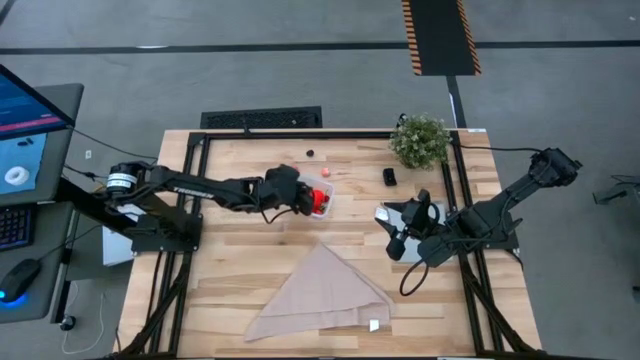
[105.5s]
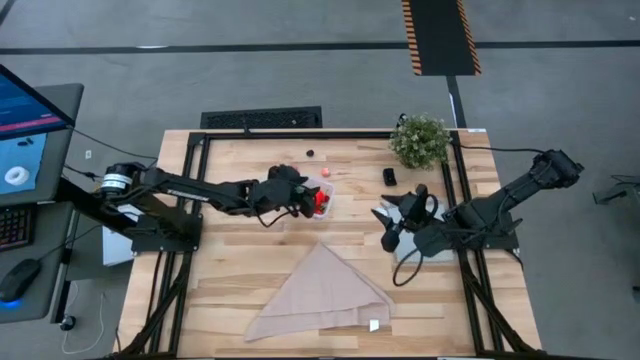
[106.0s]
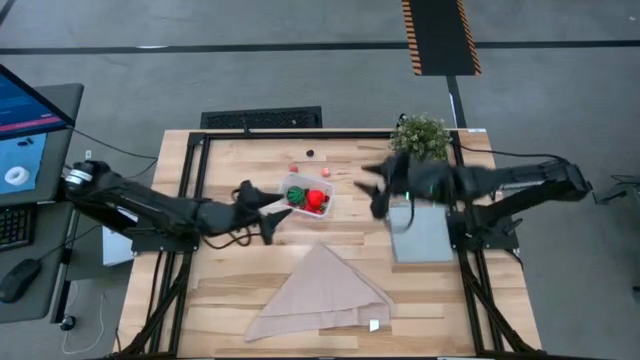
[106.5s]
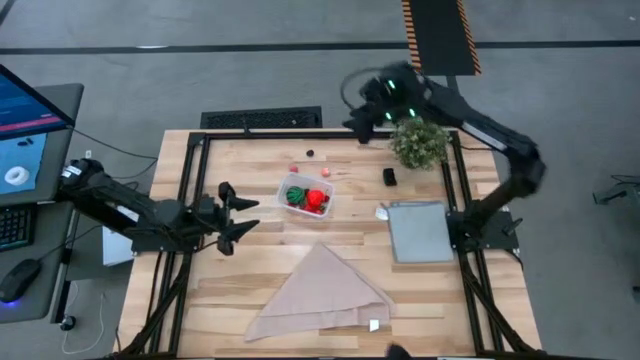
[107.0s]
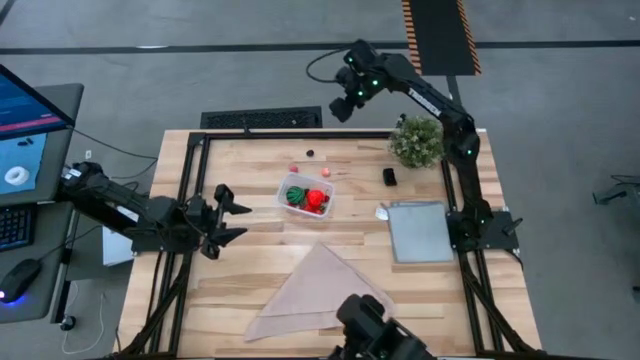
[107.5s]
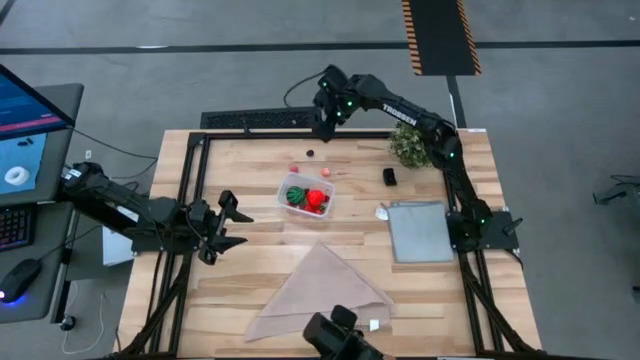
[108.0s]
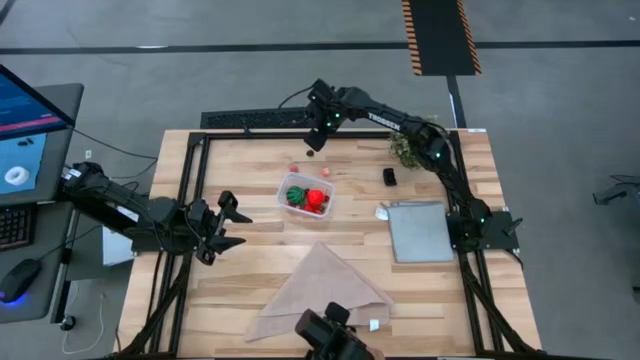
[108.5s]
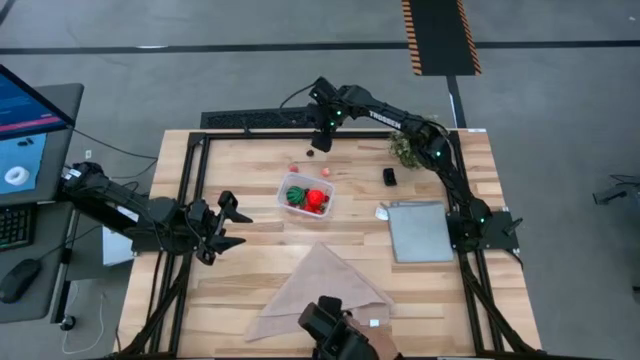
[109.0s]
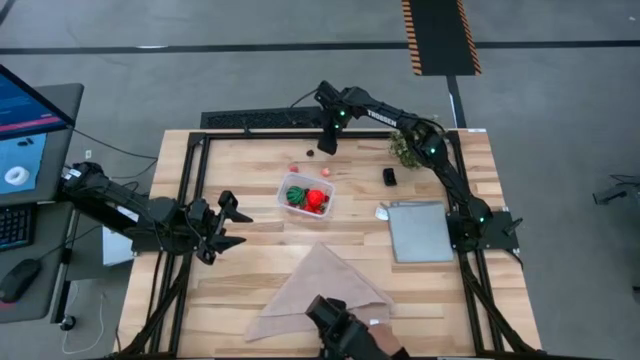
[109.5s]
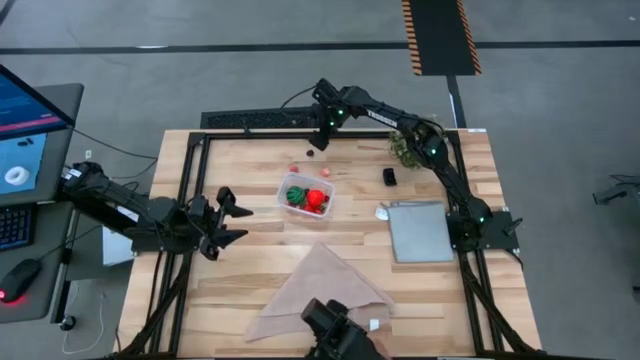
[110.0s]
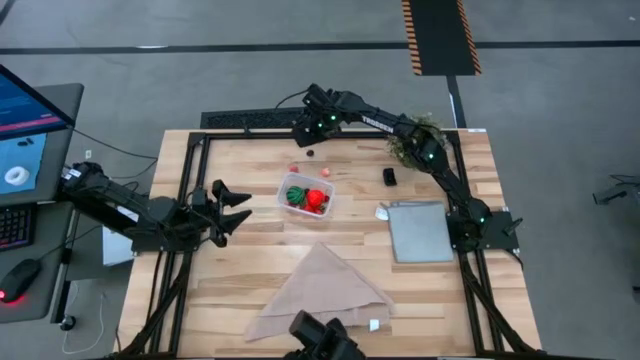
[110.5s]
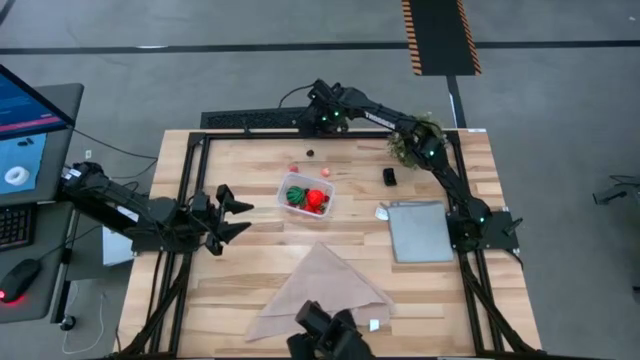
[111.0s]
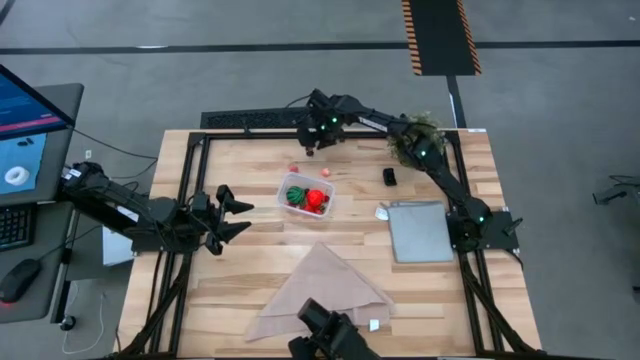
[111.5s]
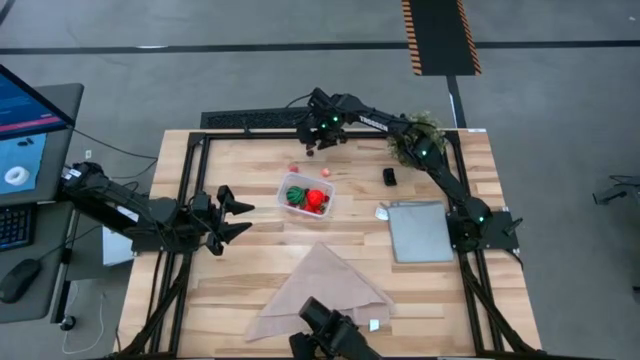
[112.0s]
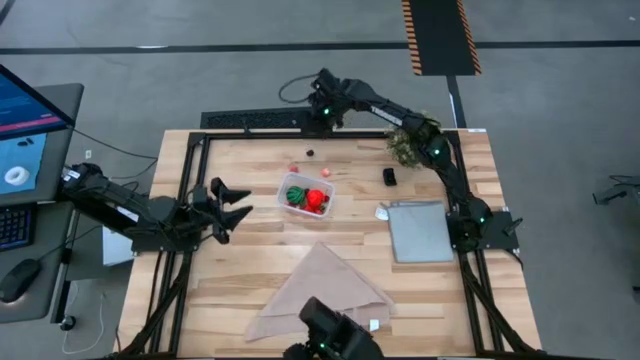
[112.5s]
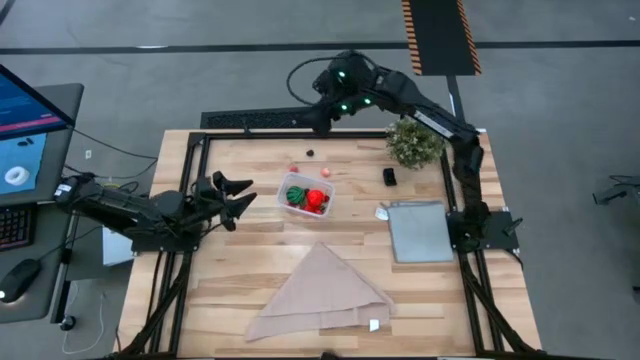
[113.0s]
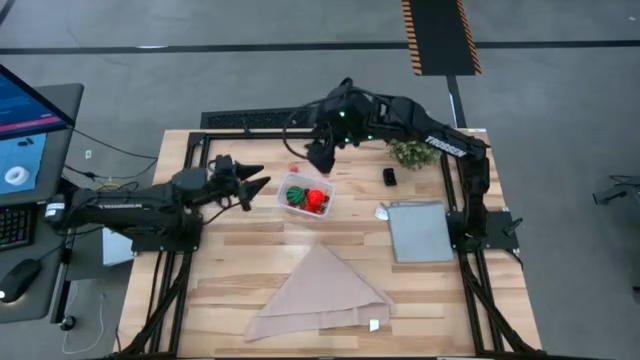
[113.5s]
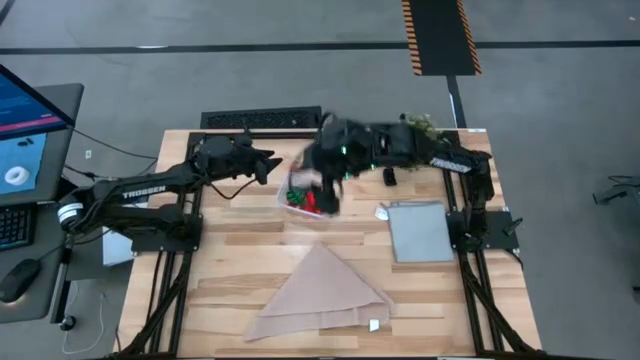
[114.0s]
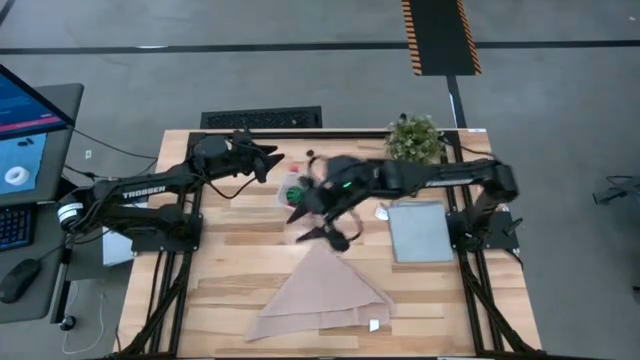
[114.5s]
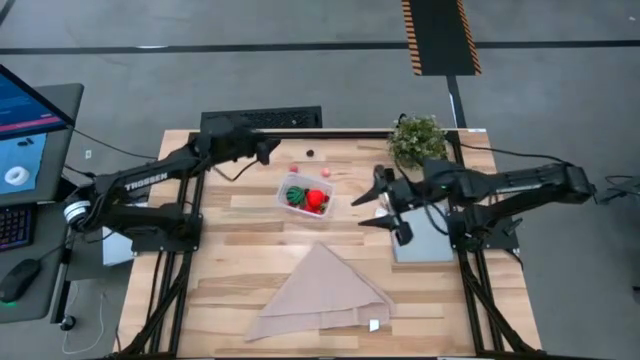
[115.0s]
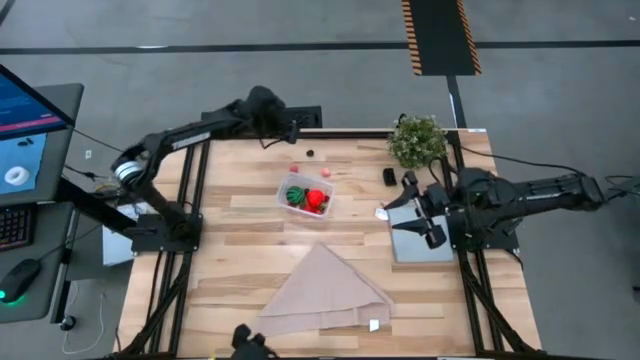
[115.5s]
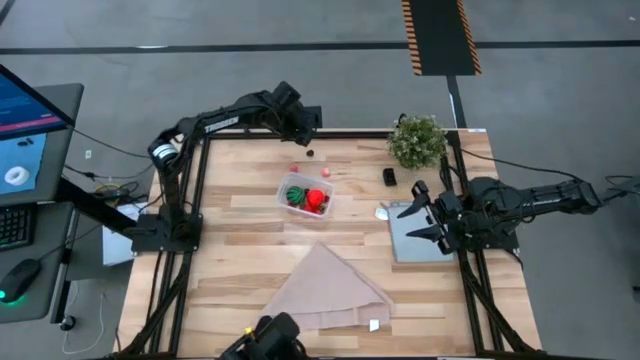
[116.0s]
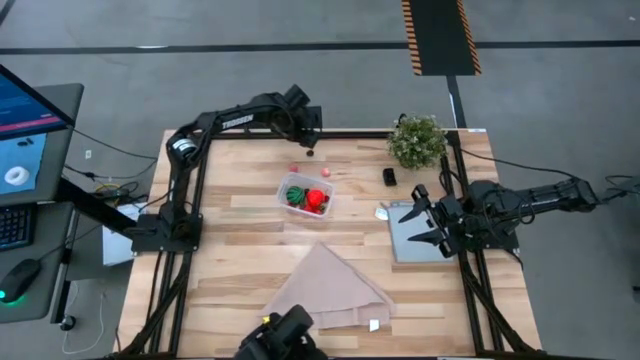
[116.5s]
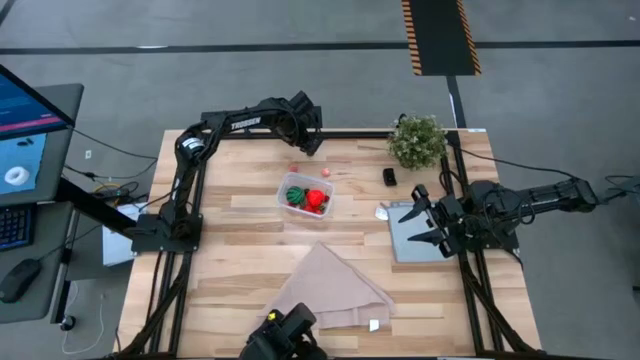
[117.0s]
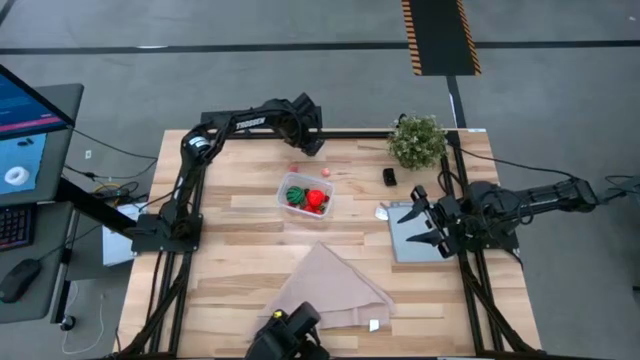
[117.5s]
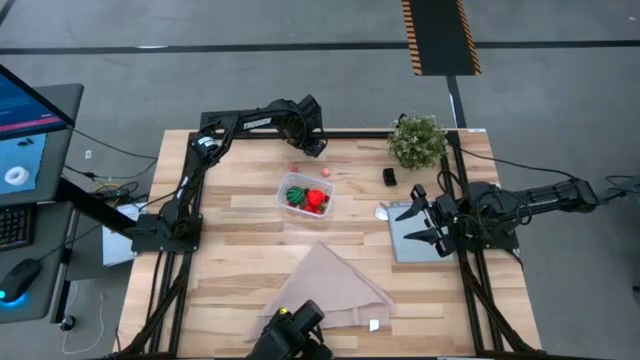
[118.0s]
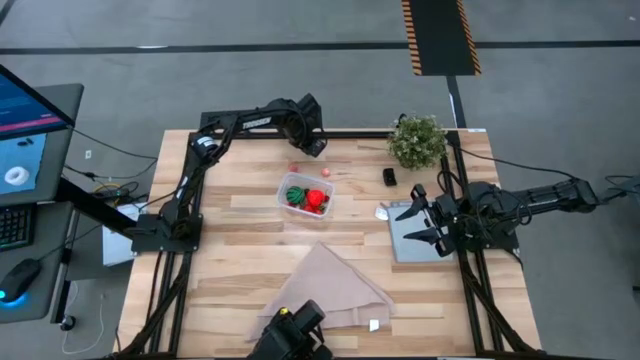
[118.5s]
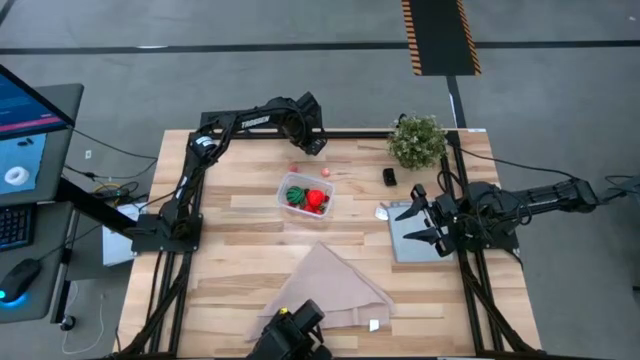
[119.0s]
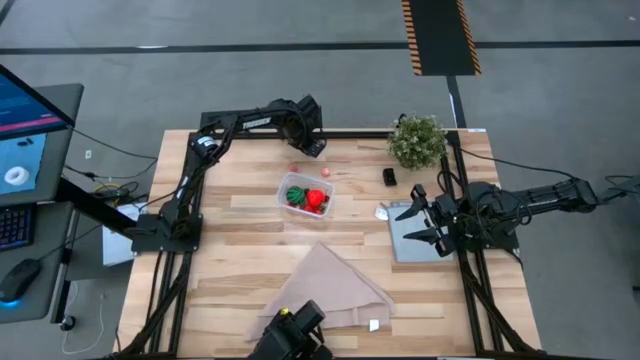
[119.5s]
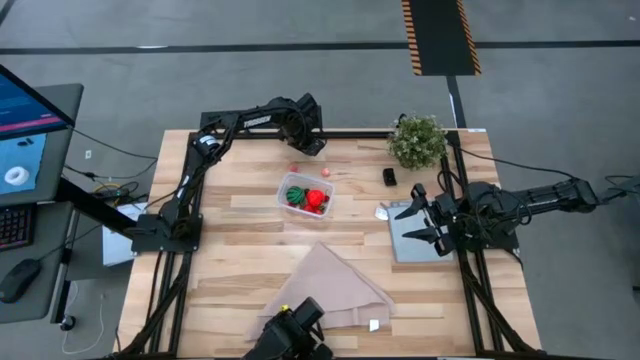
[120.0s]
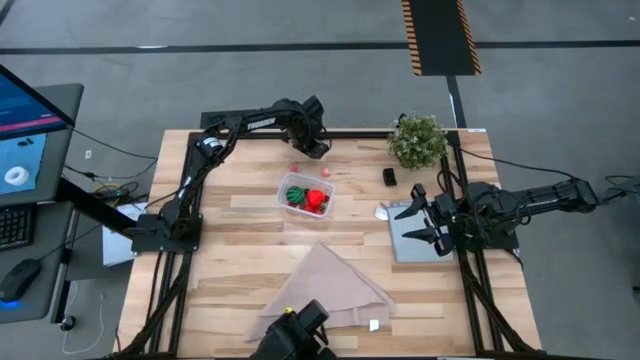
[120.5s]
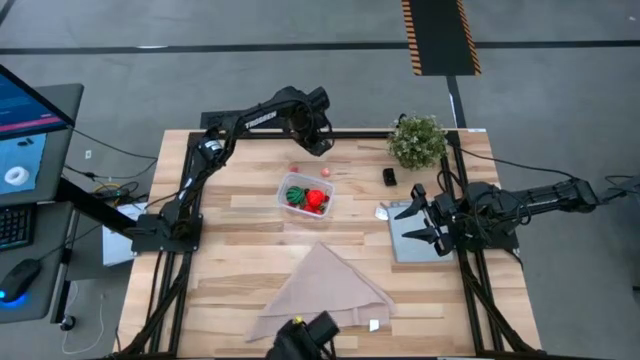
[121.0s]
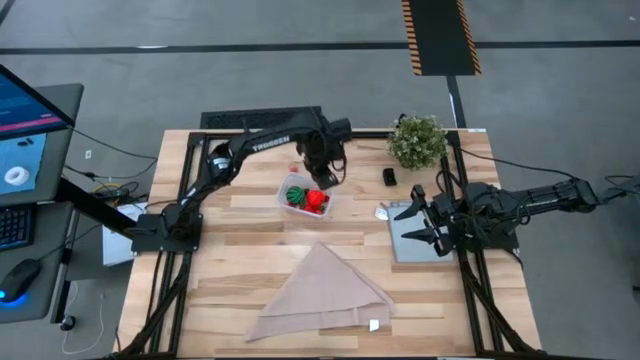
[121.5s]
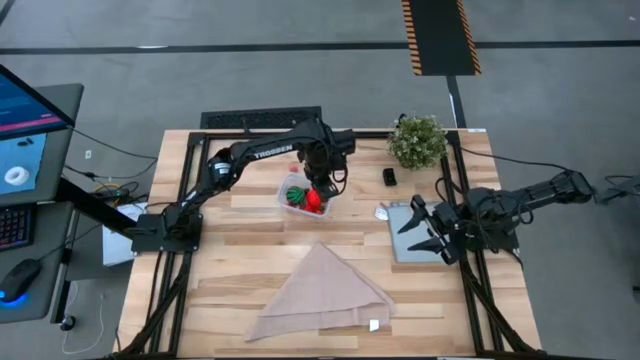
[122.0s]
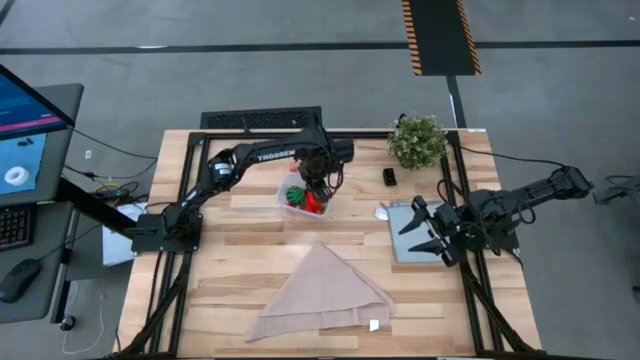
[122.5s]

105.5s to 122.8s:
Task: Pick and placing Produce into tupperware
Put the blackberry into the transparent bin

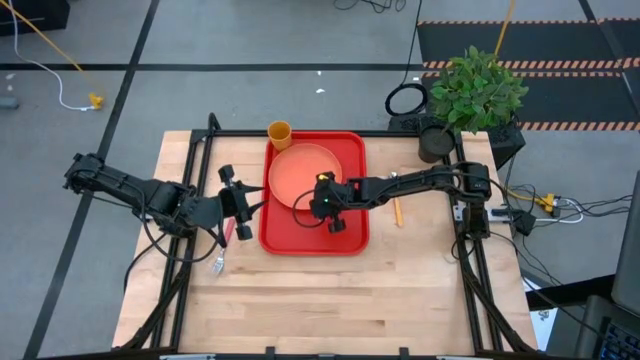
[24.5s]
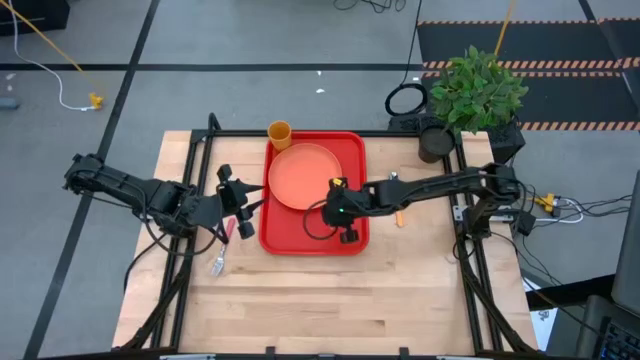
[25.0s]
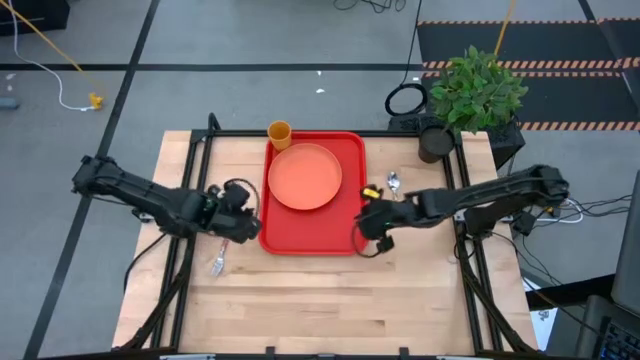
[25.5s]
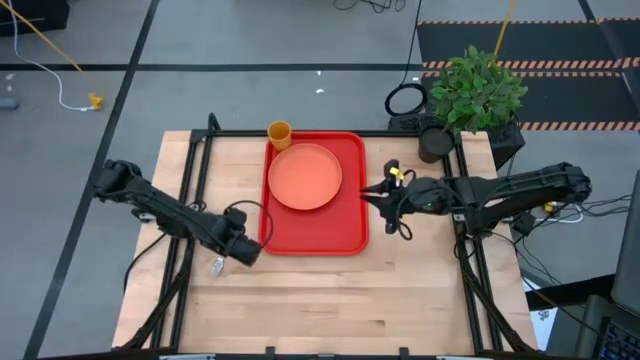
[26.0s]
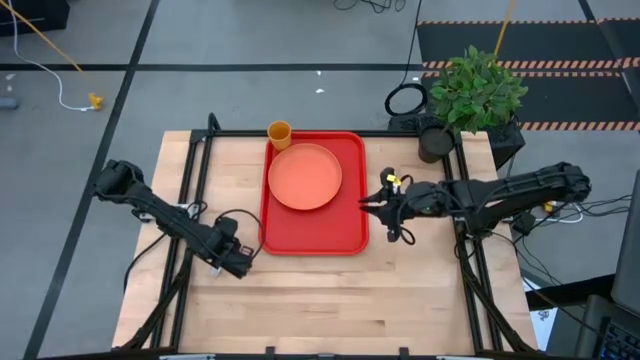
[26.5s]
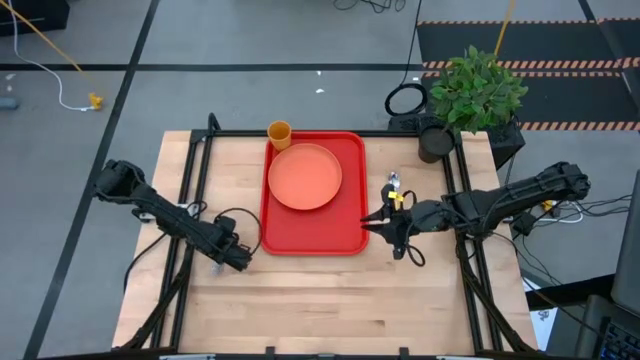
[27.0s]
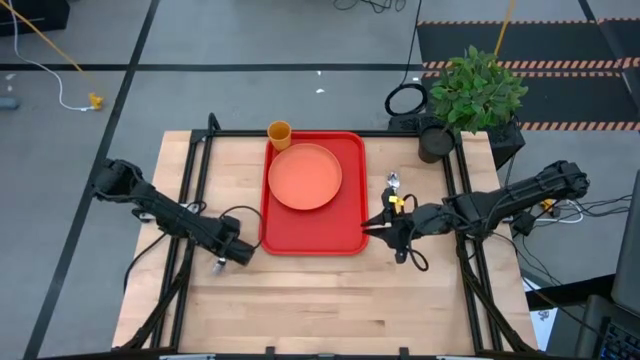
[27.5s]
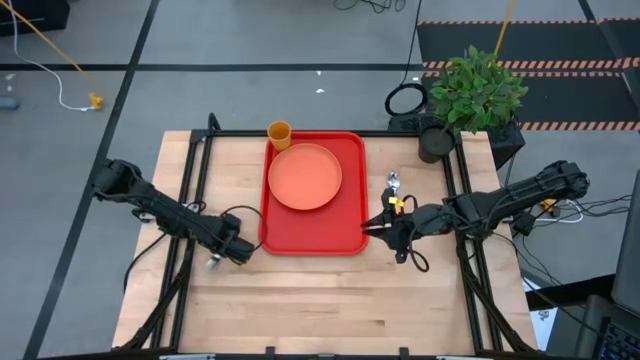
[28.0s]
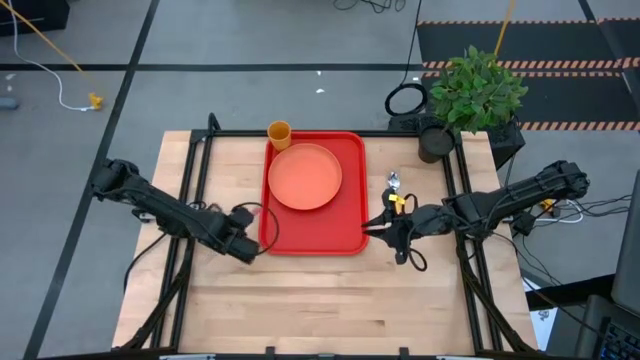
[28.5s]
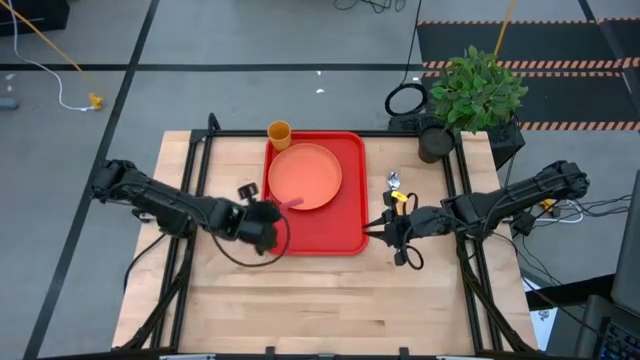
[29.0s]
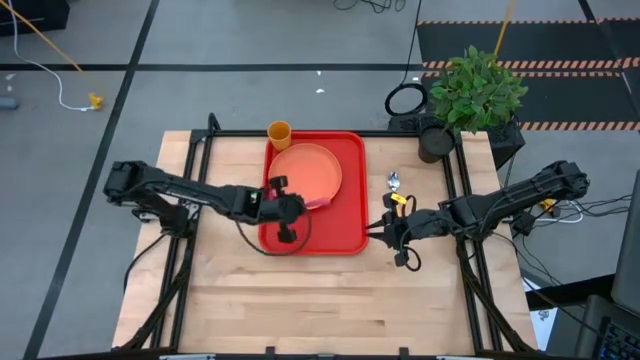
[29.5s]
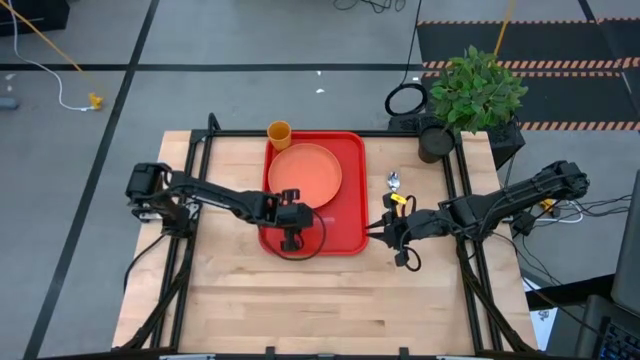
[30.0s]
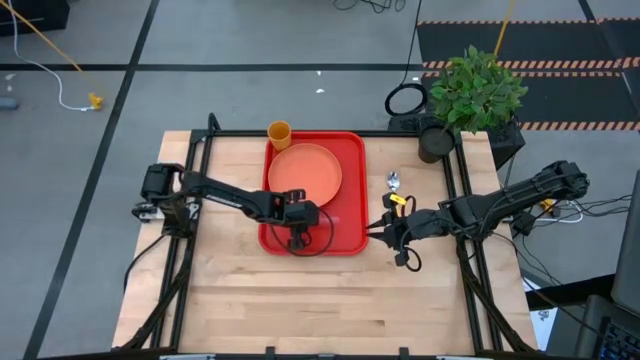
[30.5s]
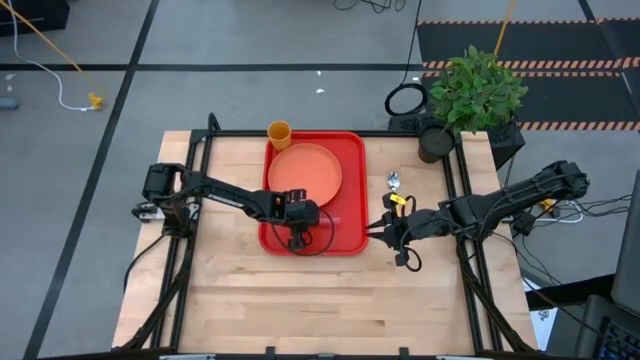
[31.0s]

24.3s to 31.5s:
Task: Pick and place plate/cup/fork/spoon on tray
Put the pink fork on the red serving tray to the left side of the orange plate
